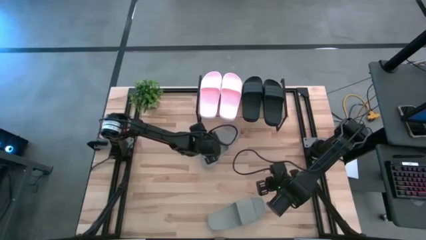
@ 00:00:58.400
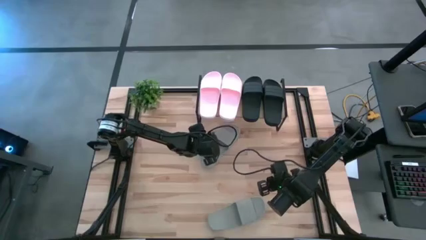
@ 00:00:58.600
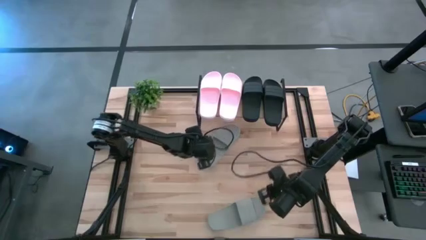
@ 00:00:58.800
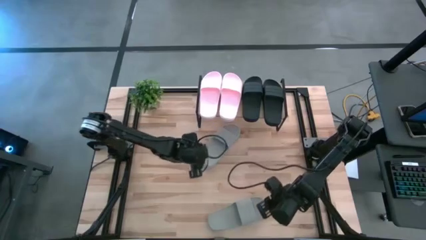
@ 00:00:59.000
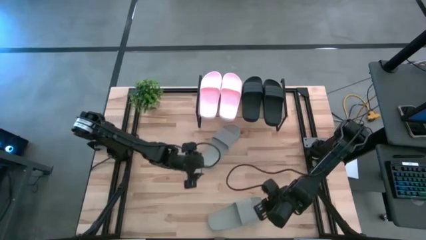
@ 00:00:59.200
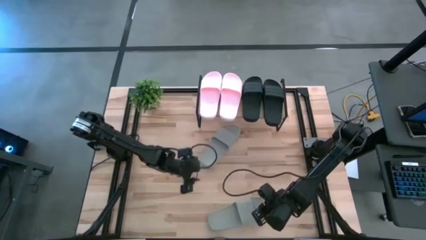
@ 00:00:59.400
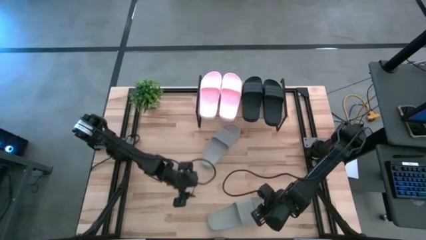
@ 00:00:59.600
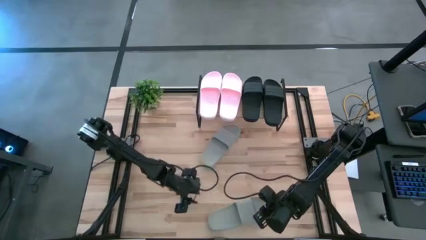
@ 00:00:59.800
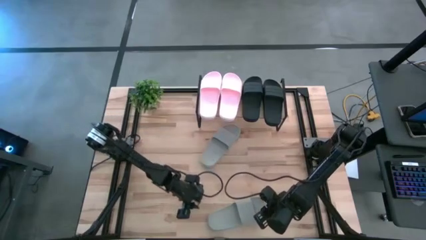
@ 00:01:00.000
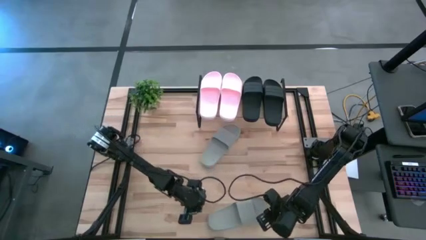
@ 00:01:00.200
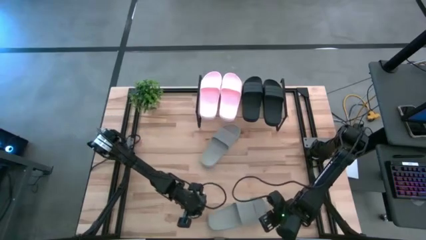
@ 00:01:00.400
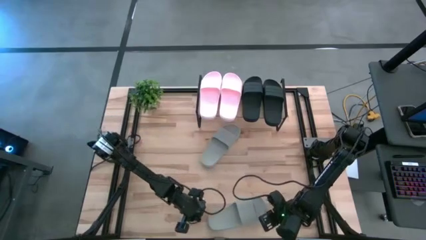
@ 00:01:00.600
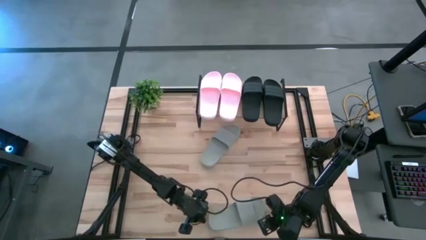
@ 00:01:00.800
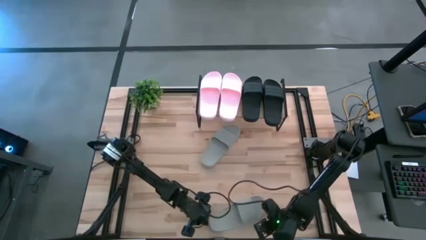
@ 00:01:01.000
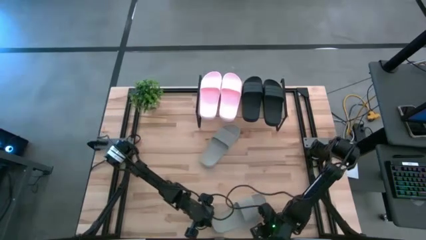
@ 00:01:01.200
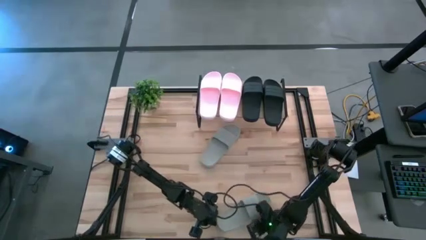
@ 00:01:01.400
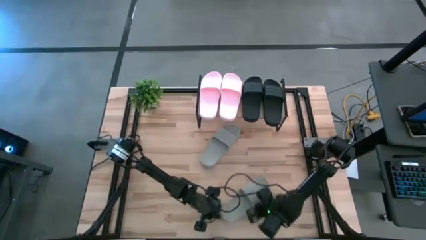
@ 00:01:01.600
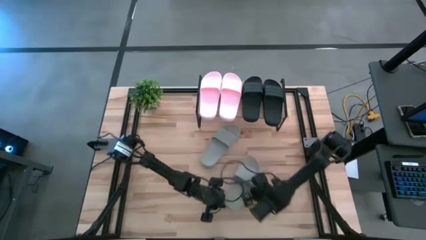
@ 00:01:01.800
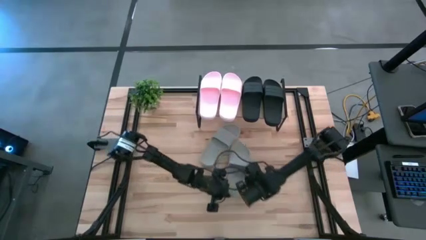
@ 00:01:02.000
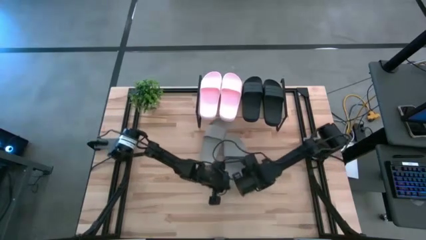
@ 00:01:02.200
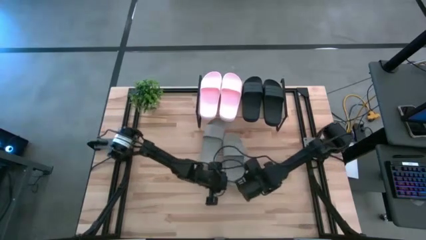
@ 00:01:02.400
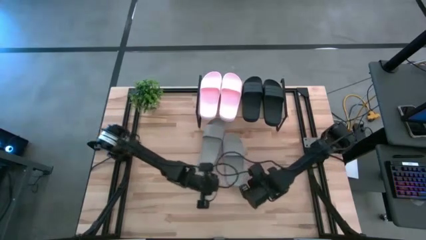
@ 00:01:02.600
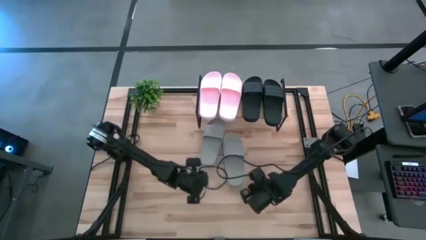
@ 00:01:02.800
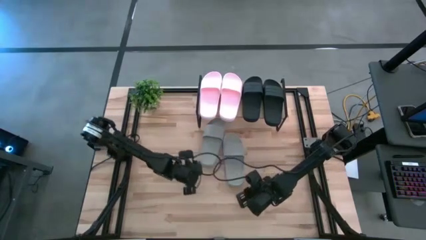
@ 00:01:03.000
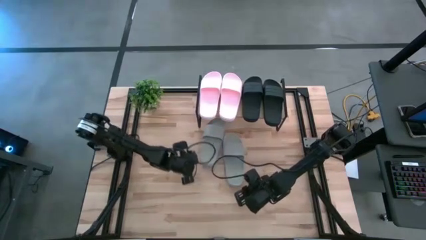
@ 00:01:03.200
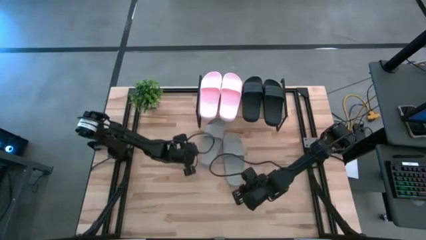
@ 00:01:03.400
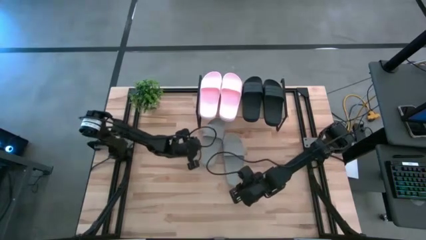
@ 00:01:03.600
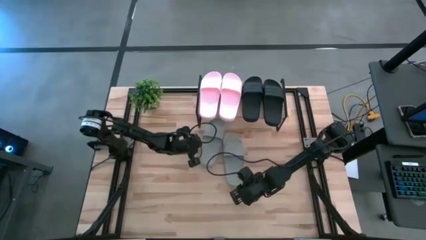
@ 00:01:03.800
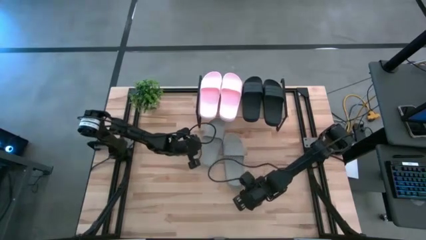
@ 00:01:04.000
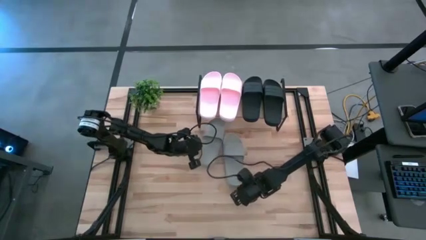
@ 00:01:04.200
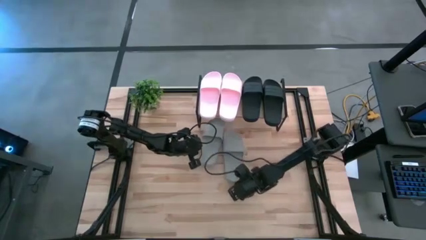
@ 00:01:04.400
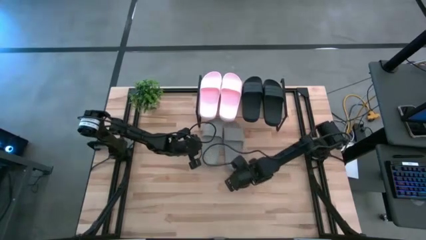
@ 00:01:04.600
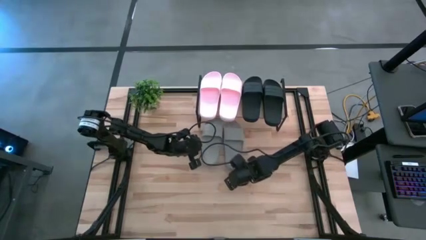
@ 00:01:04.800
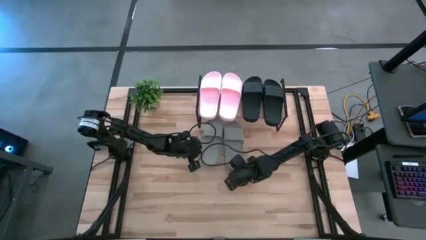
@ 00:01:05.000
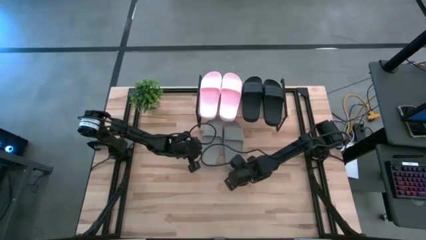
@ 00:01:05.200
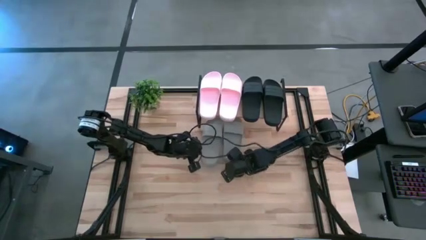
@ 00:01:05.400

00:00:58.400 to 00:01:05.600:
Task: Pick and place slides into the shelf
Move the bottom gray slide toward the shelf

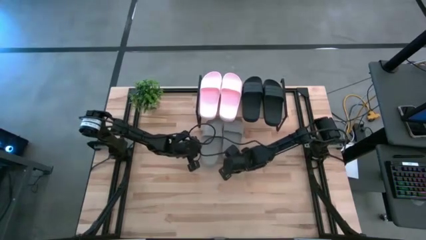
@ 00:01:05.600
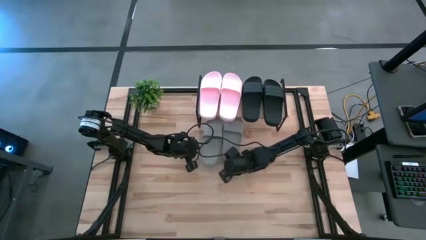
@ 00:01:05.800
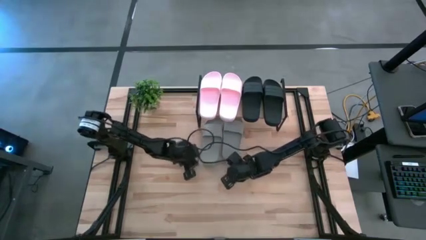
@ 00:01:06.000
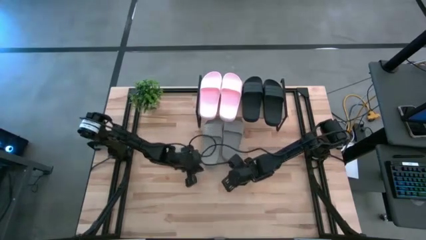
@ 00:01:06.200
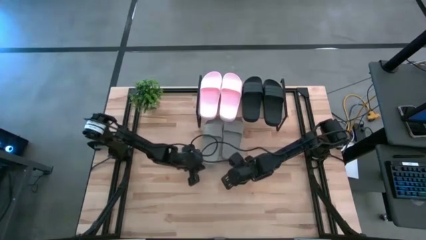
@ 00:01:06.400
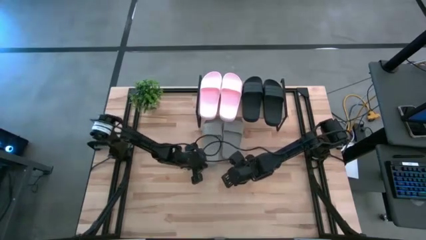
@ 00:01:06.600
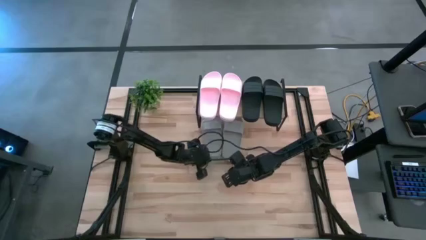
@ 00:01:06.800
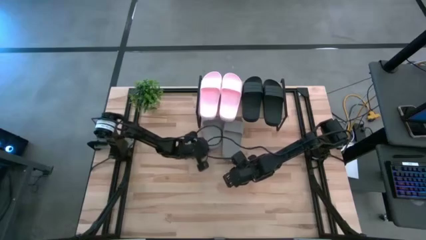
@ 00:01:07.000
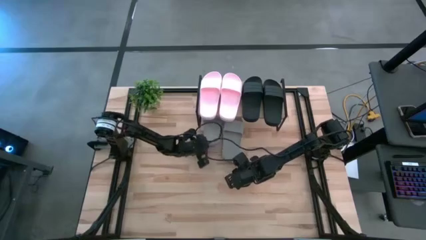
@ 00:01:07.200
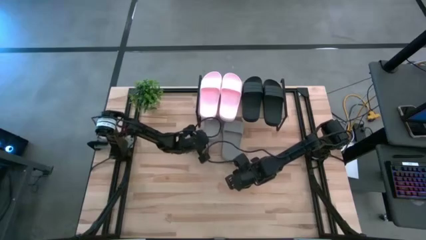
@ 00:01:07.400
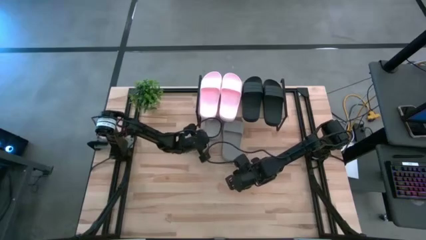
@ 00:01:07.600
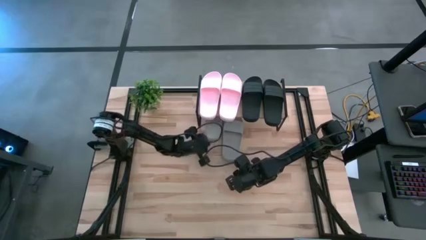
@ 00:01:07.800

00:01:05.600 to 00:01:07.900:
Move the left gray slide under the shelf

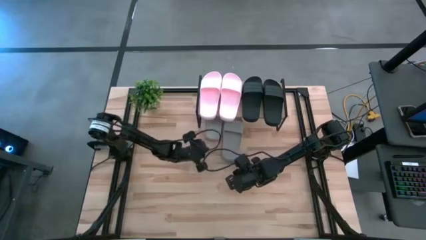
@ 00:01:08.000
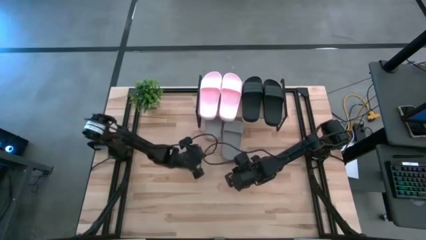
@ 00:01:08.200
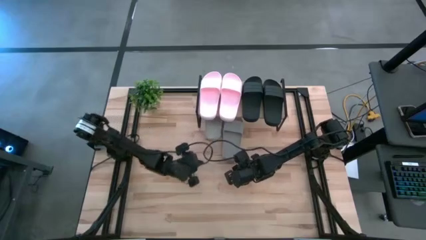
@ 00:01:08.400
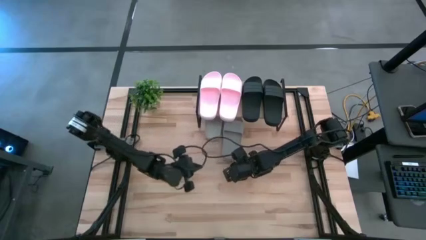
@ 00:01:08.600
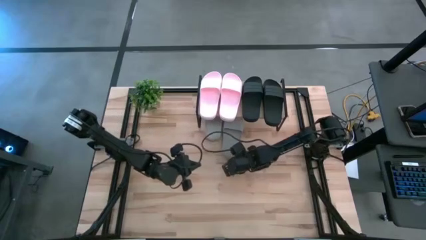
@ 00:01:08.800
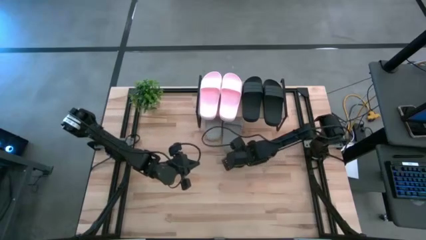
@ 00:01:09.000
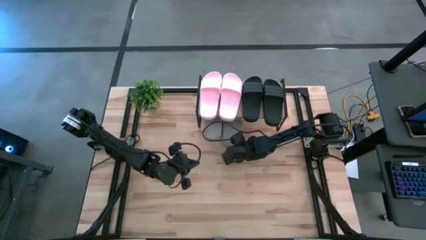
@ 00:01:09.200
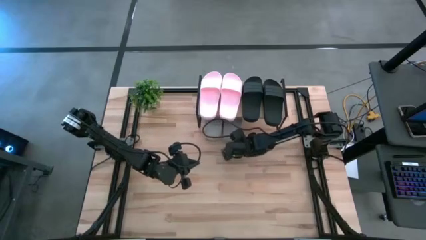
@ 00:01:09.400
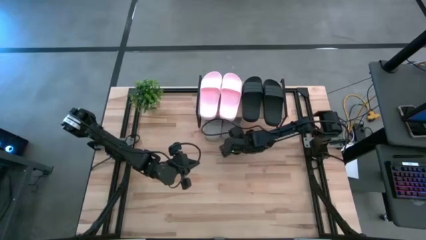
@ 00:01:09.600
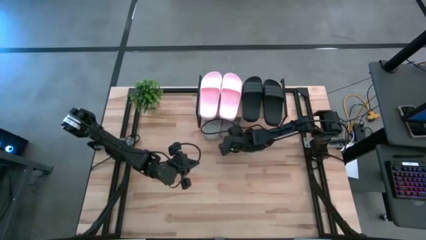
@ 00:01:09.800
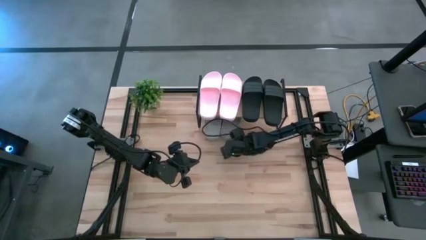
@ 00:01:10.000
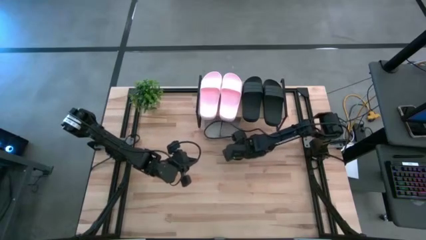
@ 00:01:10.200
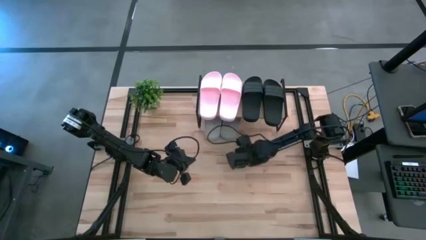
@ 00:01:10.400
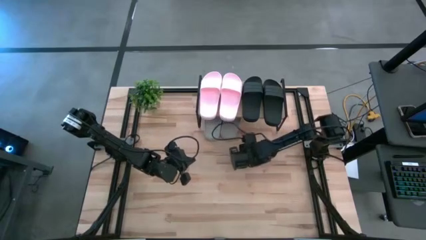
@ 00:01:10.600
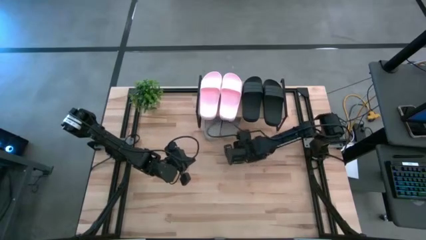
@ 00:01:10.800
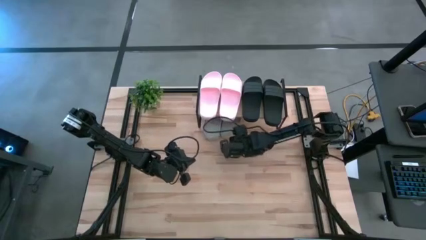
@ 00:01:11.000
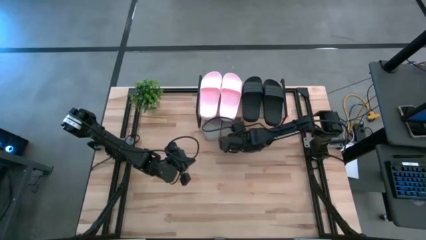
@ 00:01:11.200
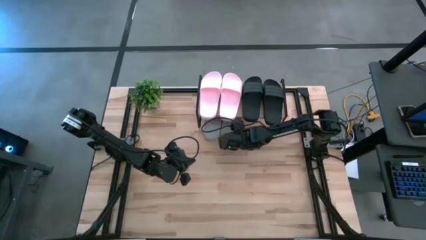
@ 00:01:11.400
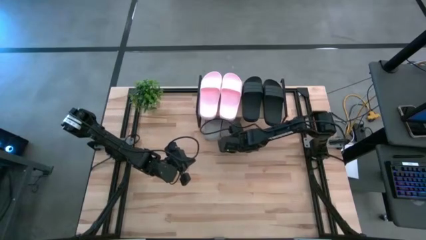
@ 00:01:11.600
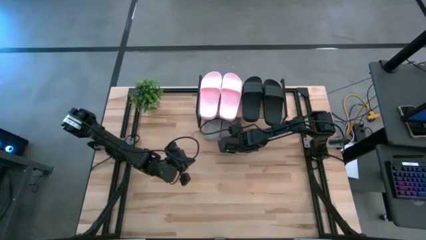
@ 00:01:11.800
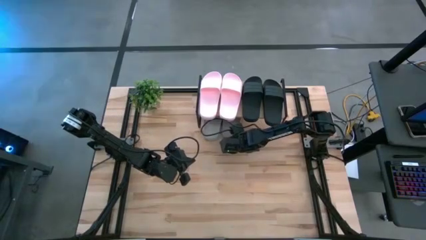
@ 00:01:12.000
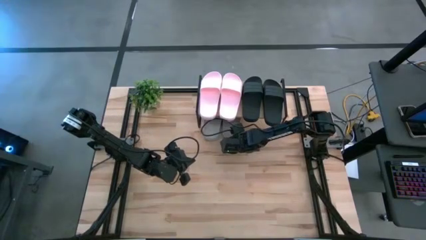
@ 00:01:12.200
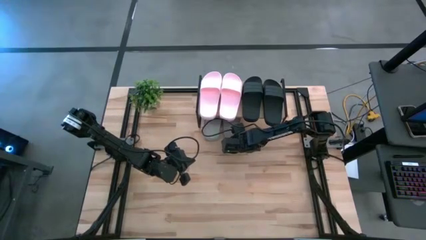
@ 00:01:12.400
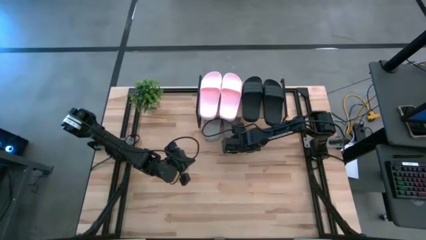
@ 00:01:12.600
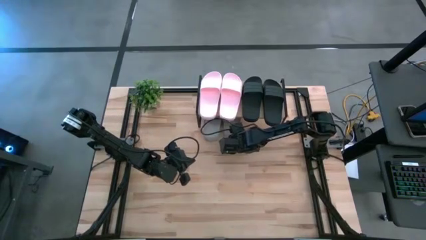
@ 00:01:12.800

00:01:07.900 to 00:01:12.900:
Move the right gray slide under the shelf

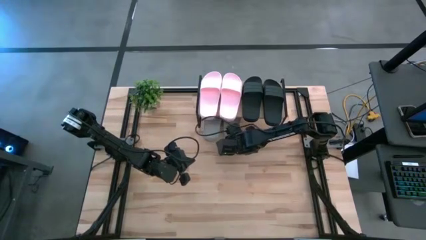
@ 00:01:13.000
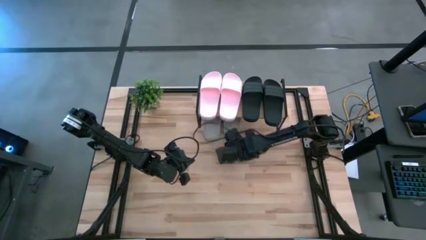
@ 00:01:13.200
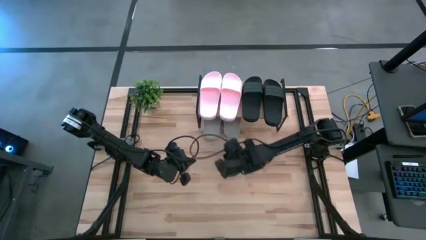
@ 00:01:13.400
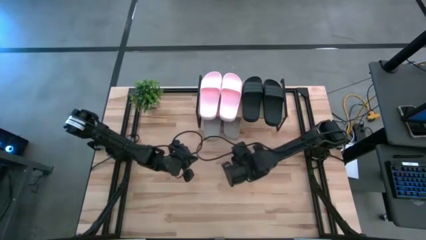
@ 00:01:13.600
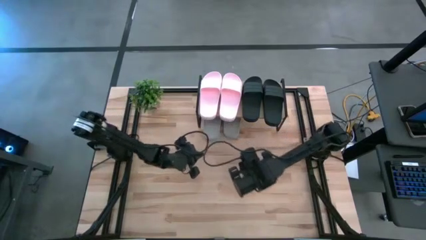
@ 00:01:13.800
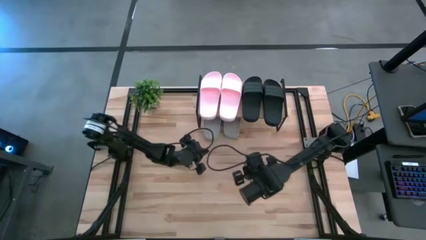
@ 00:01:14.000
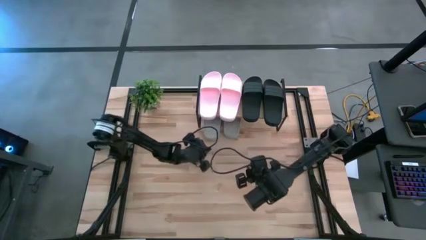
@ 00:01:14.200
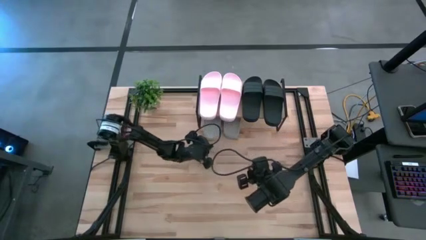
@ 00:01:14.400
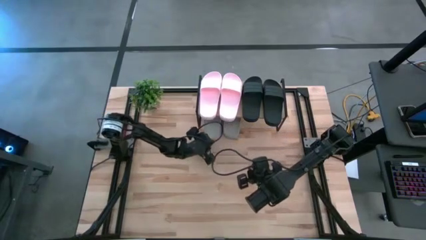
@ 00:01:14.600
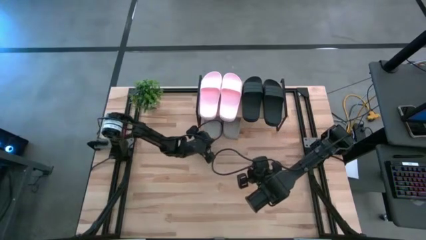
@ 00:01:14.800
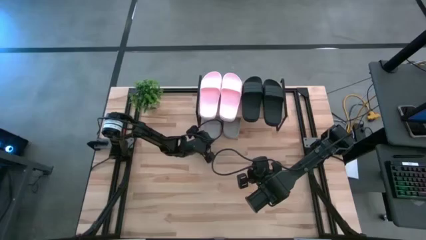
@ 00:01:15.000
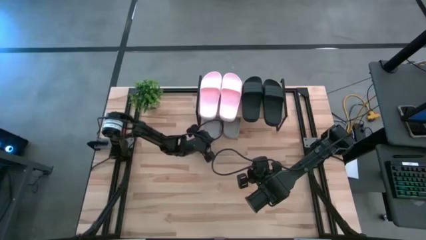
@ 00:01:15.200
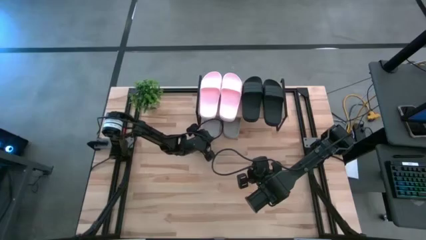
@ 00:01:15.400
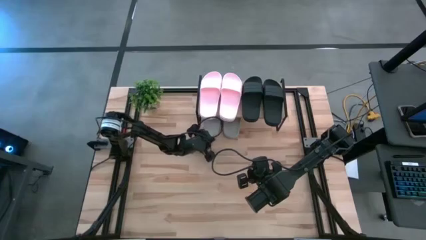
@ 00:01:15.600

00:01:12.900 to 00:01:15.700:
Adjust the left gray slide under the table
